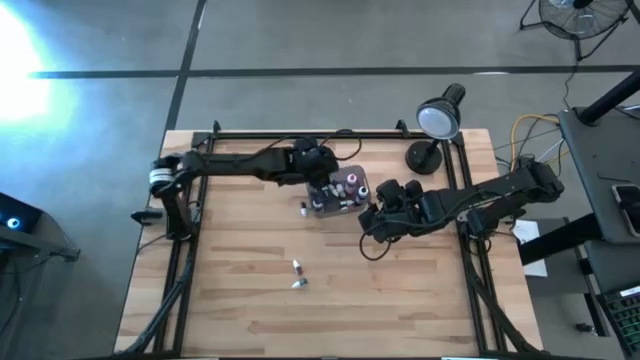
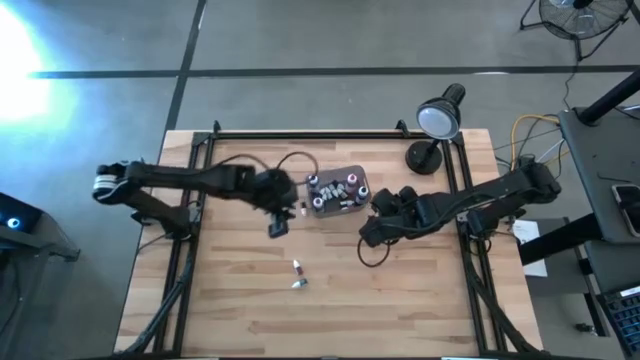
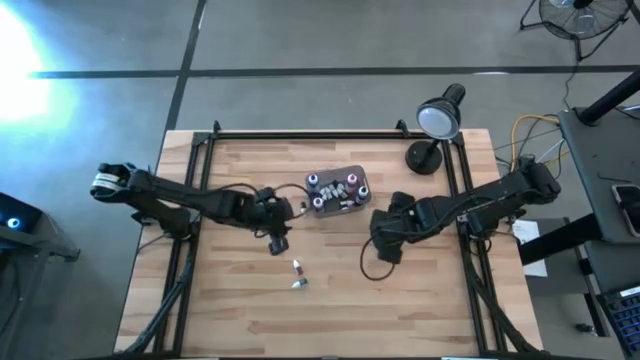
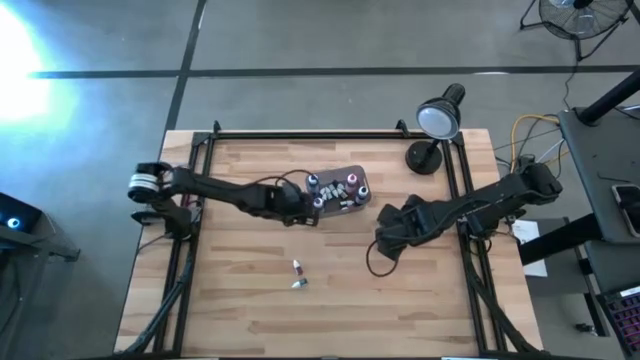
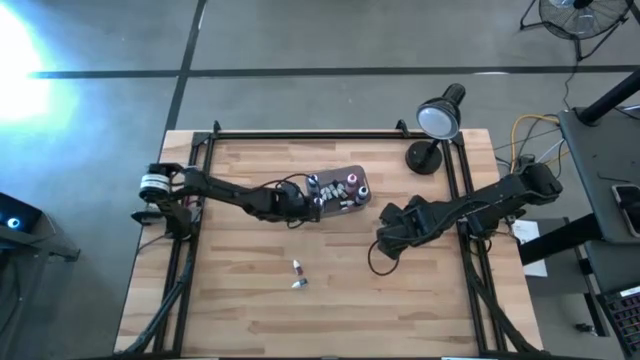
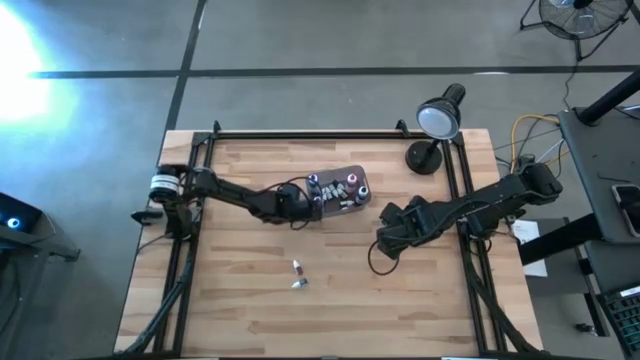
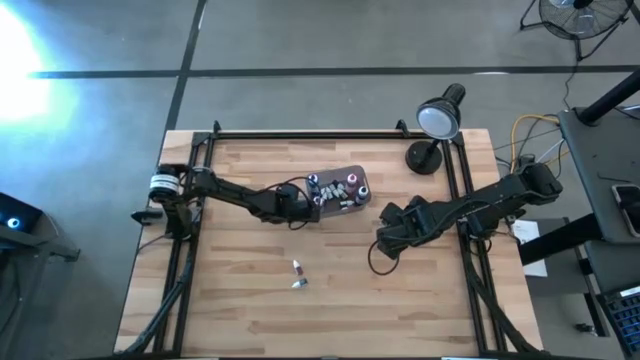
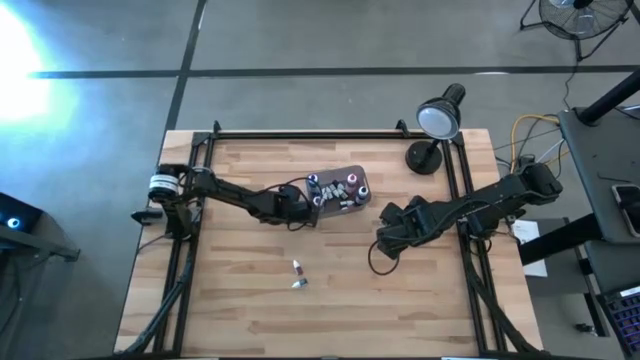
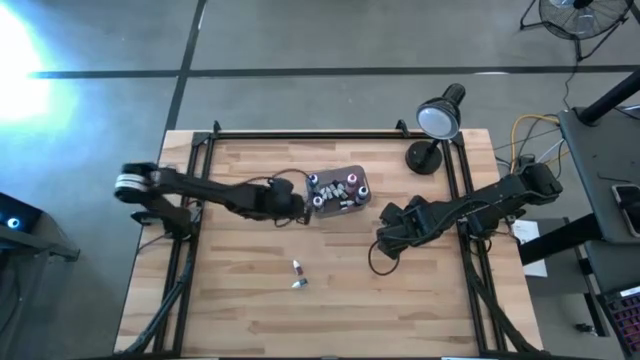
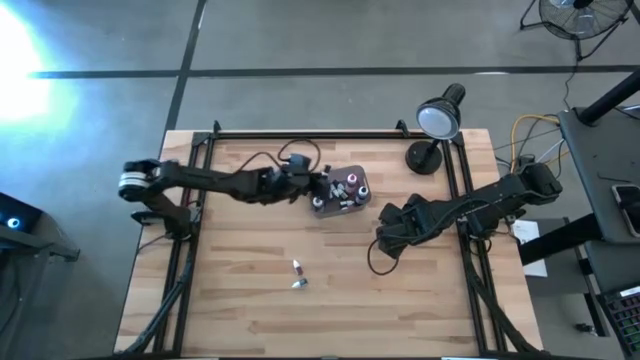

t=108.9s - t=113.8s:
Task: Pick & Place food coloring
Put the small black food coloring bottle into the black transparent bin

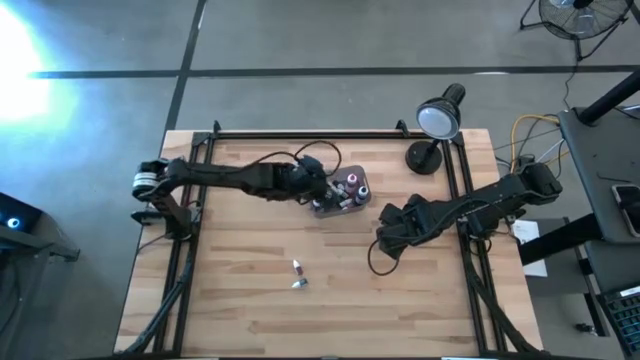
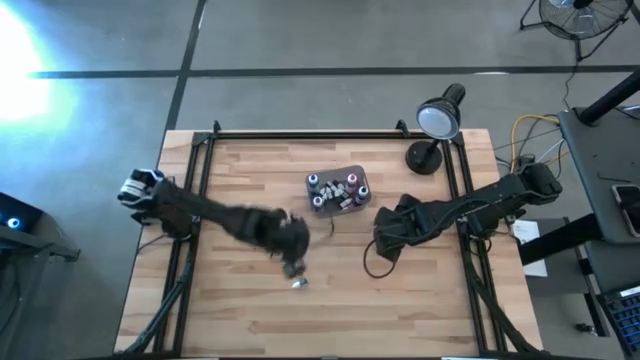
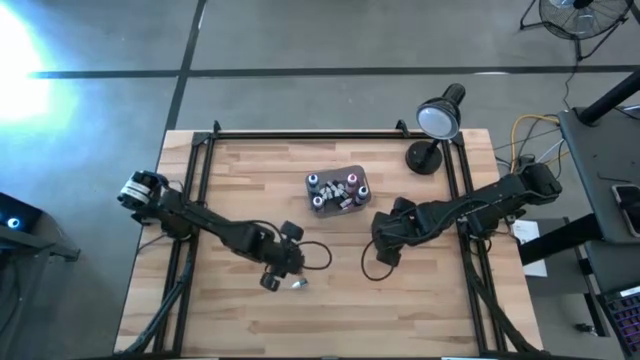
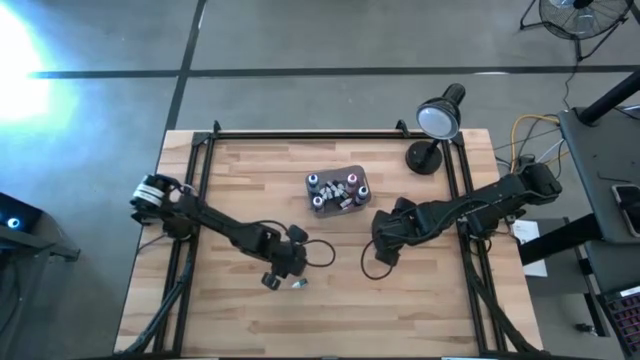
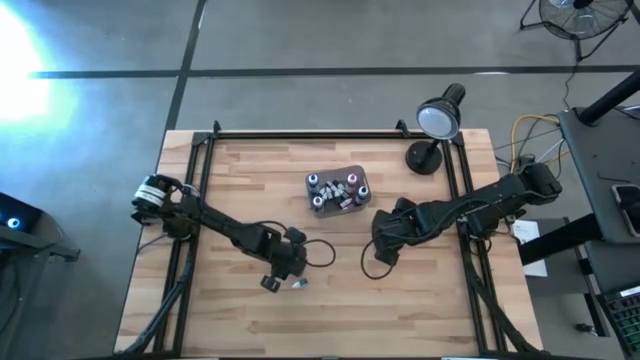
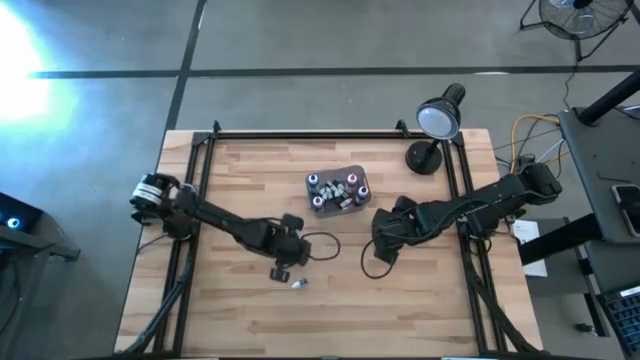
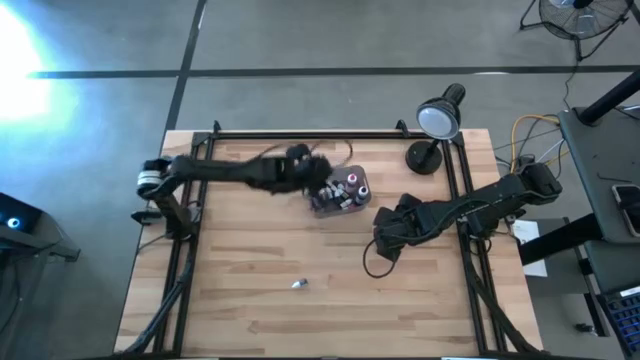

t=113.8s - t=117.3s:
Put the small red food coloring bottle into the black transparent bin

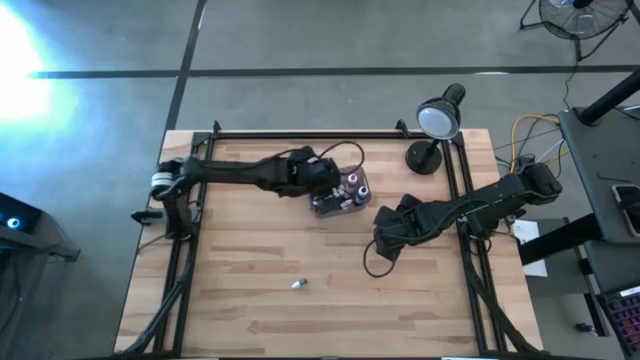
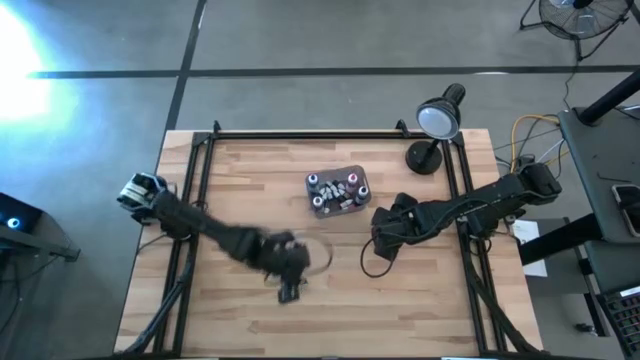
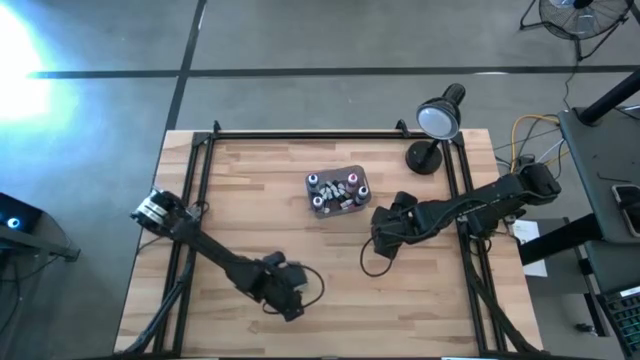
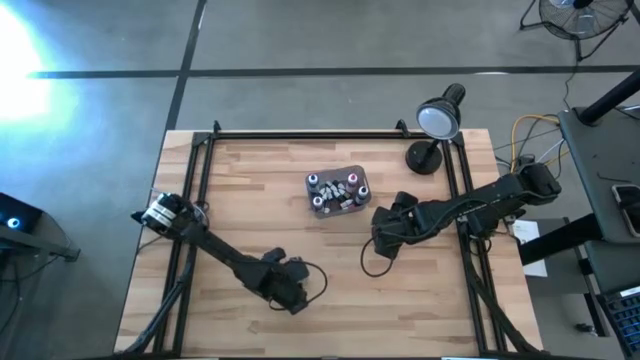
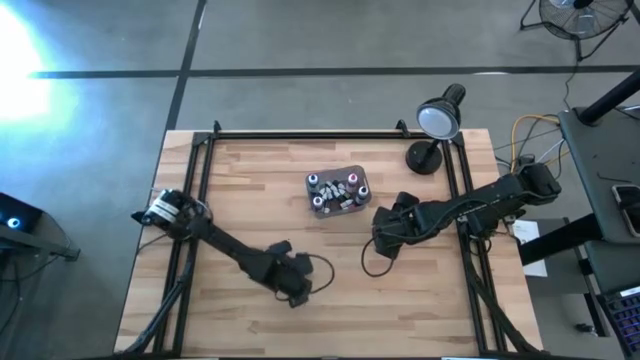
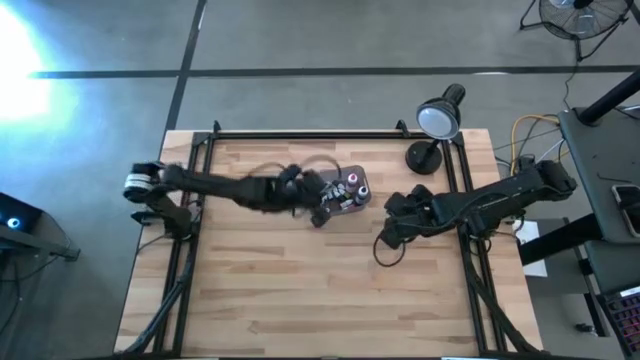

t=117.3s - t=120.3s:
Put the small black food coloring bottle into the black transparent bin

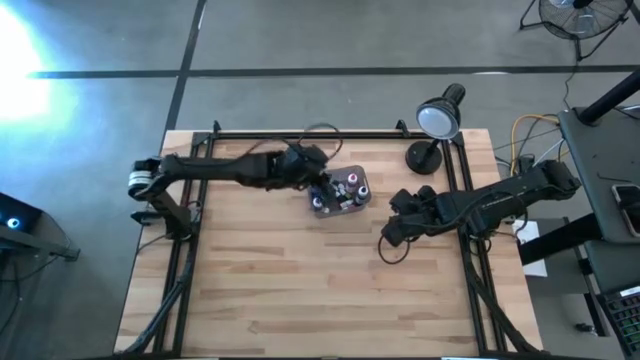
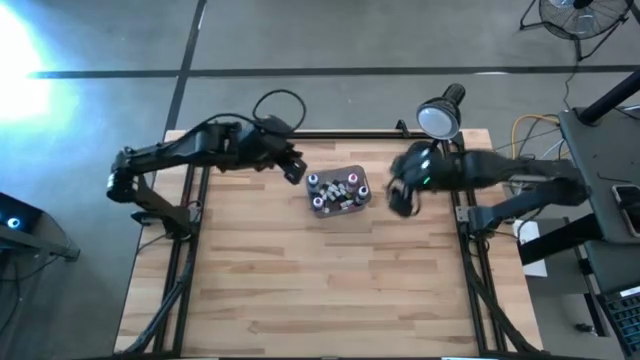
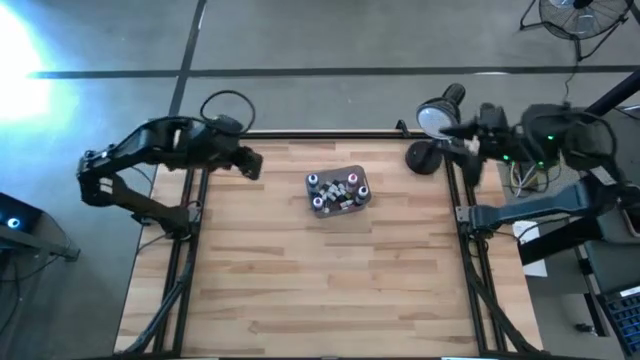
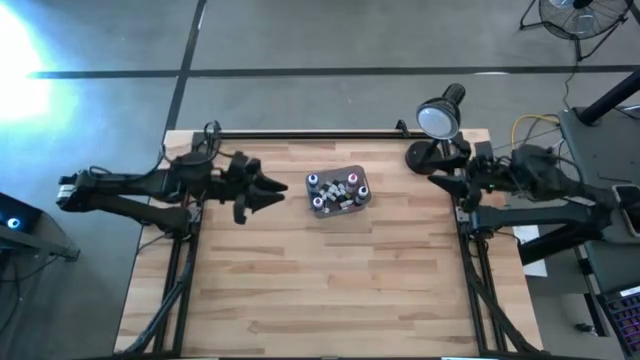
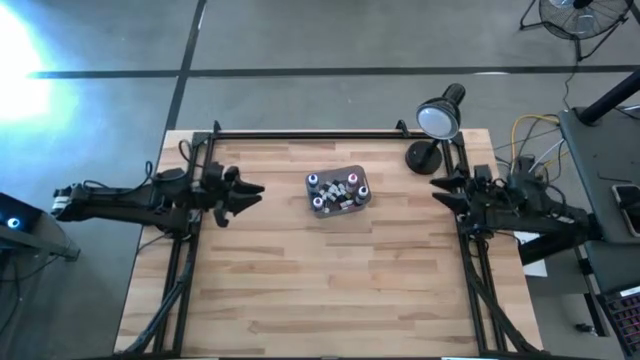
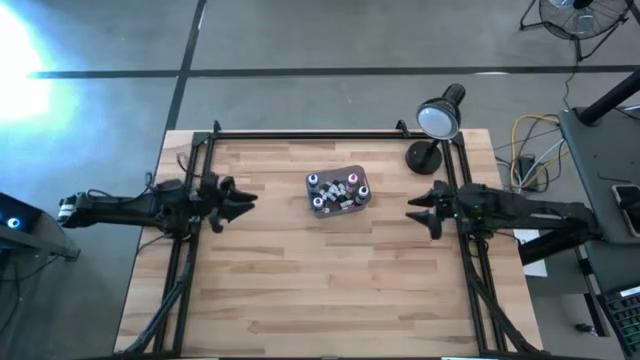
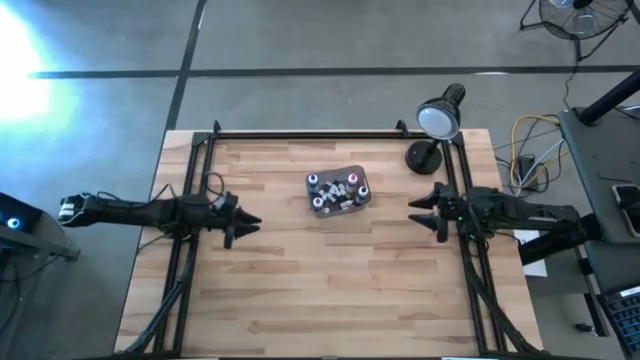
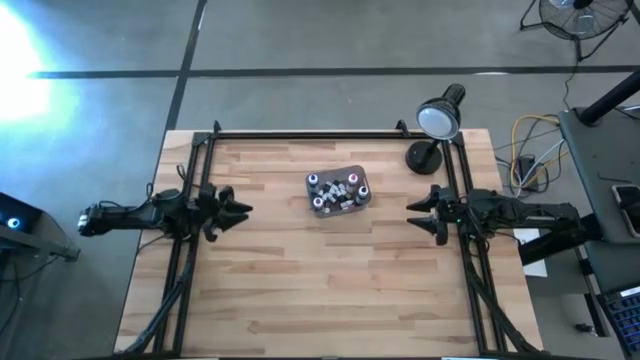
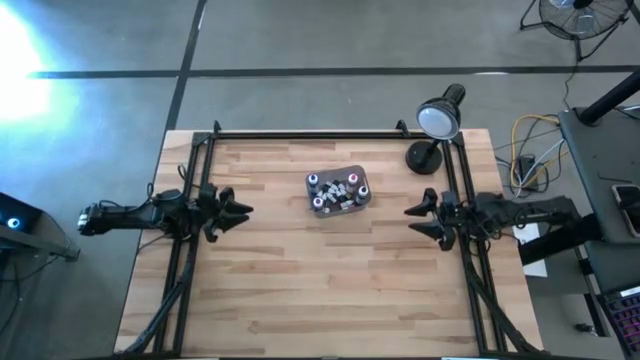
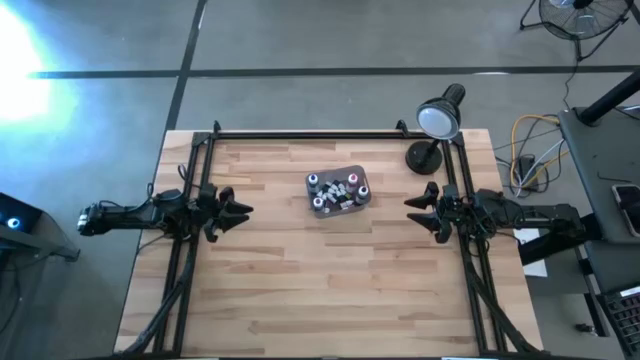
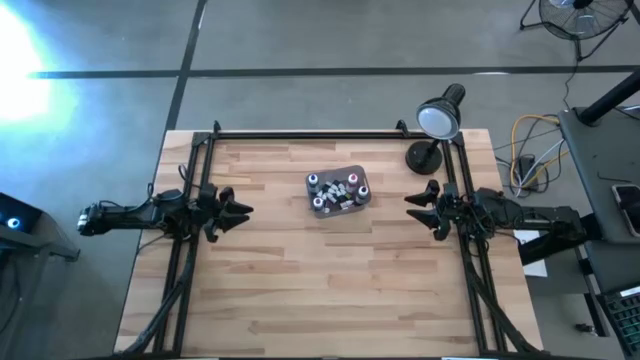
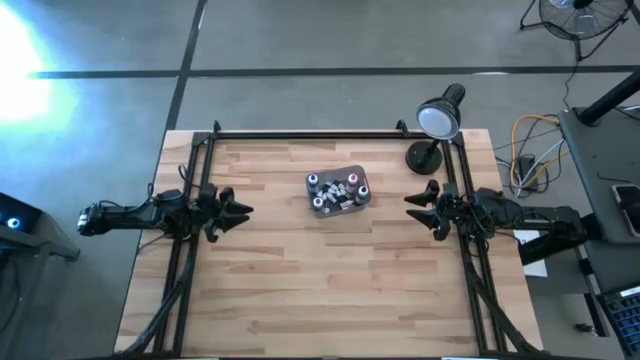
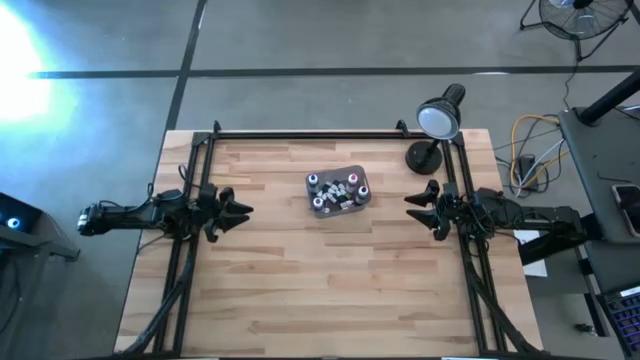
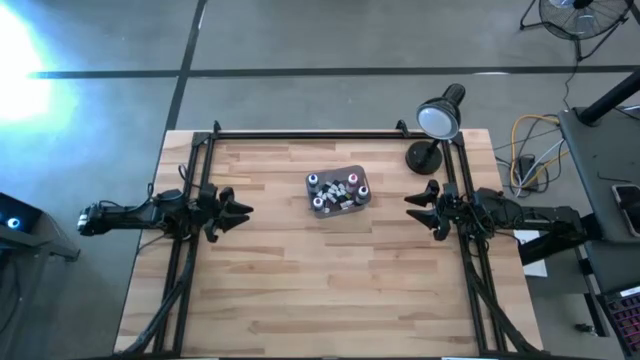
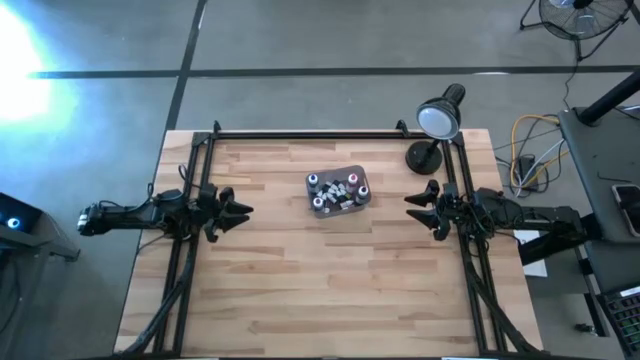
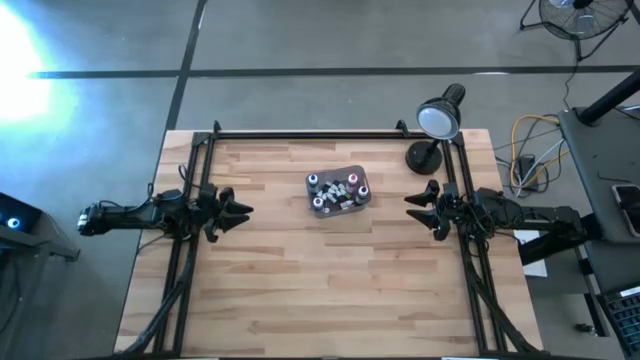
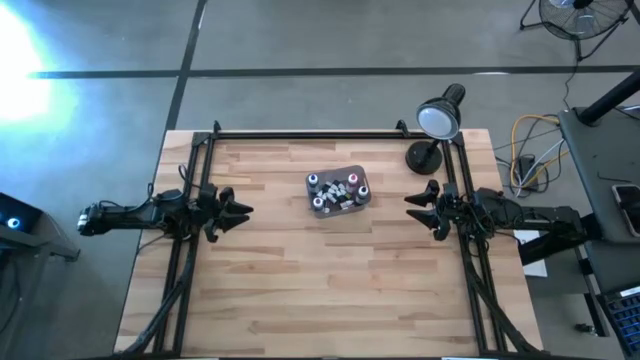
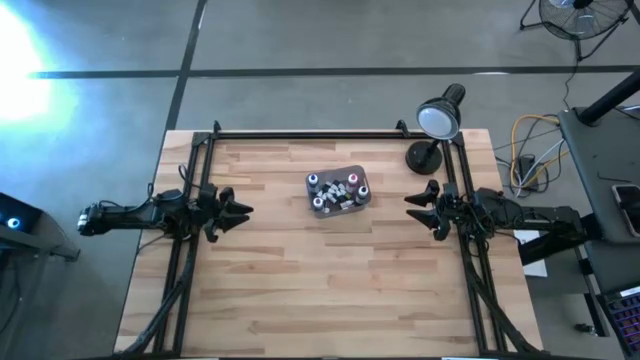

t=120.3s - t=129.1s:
Return to Home Position
